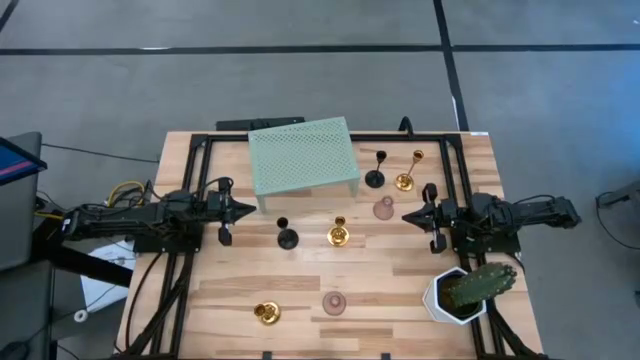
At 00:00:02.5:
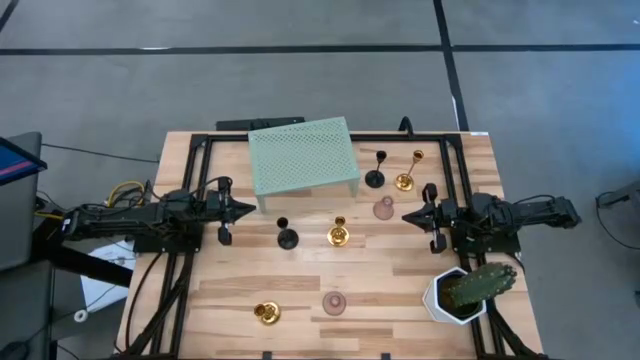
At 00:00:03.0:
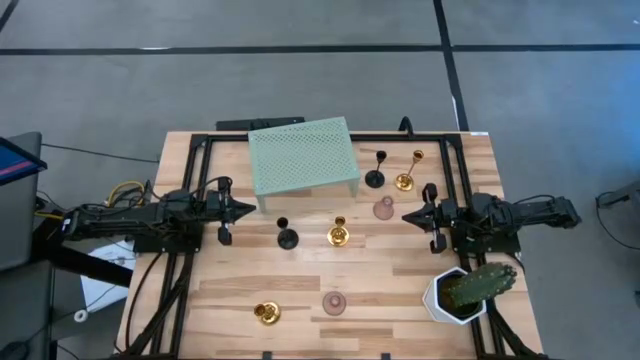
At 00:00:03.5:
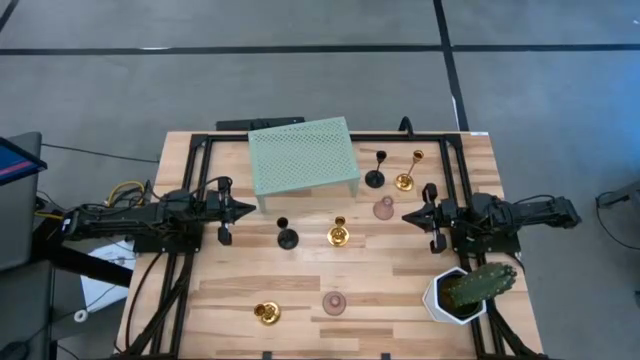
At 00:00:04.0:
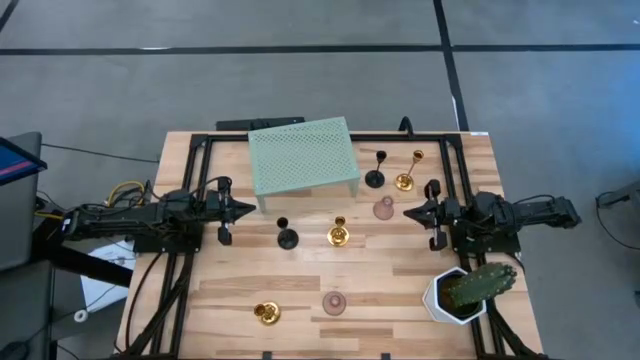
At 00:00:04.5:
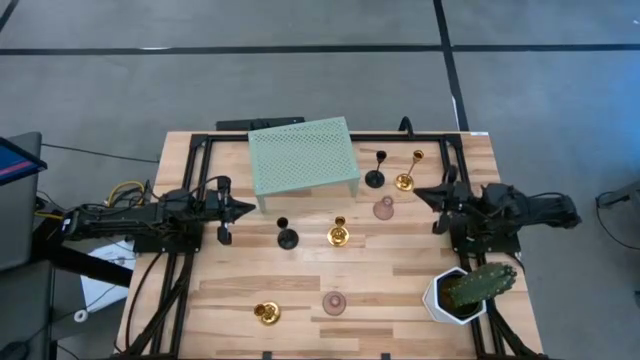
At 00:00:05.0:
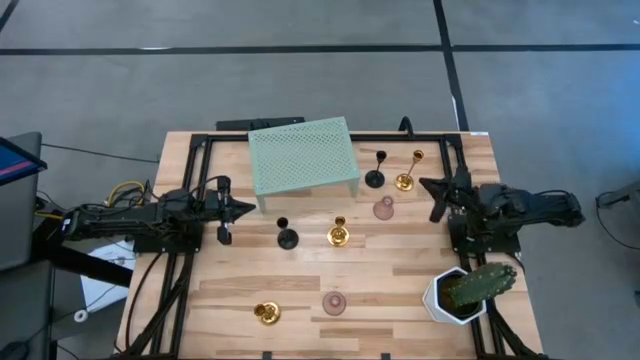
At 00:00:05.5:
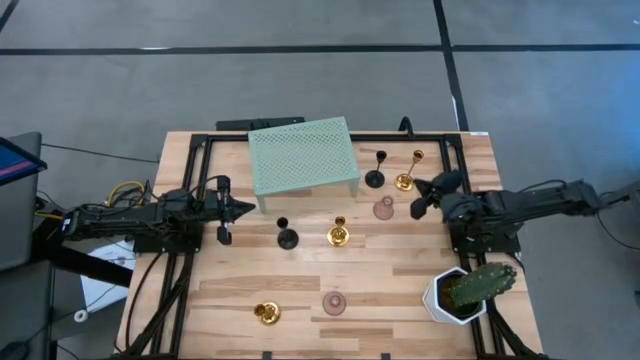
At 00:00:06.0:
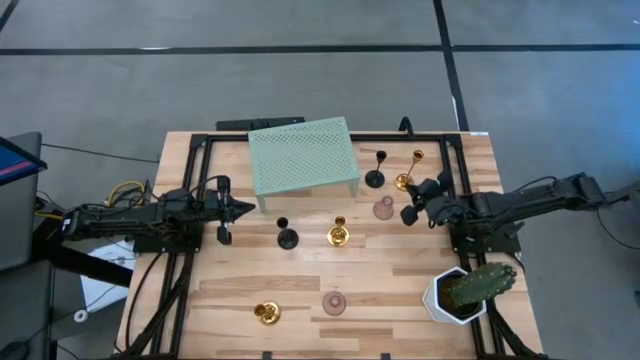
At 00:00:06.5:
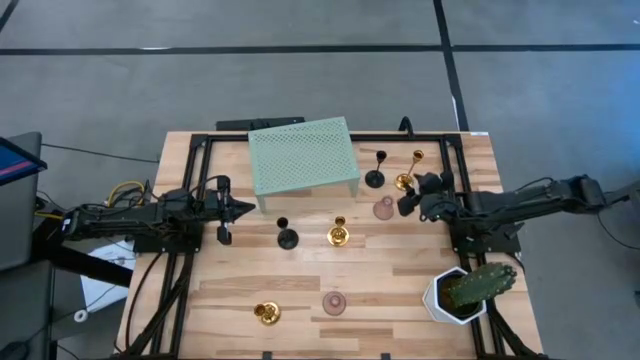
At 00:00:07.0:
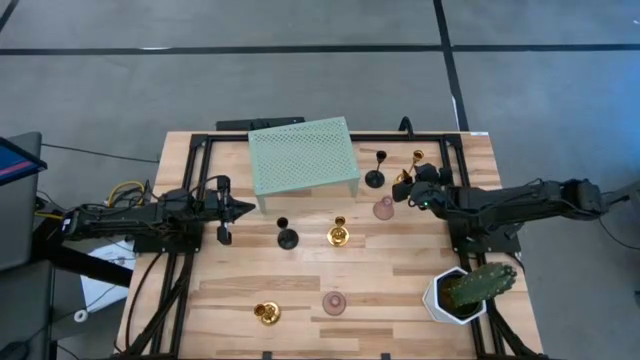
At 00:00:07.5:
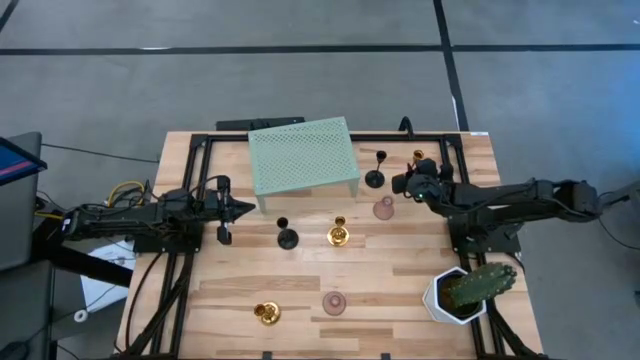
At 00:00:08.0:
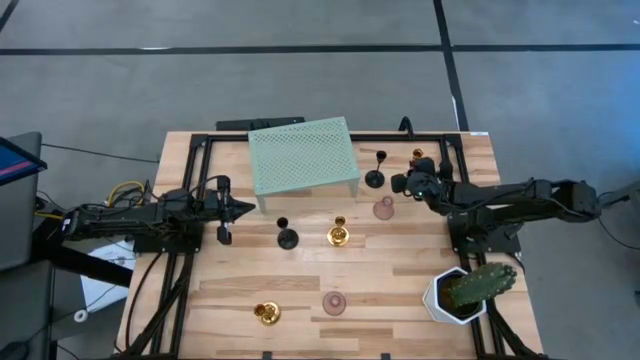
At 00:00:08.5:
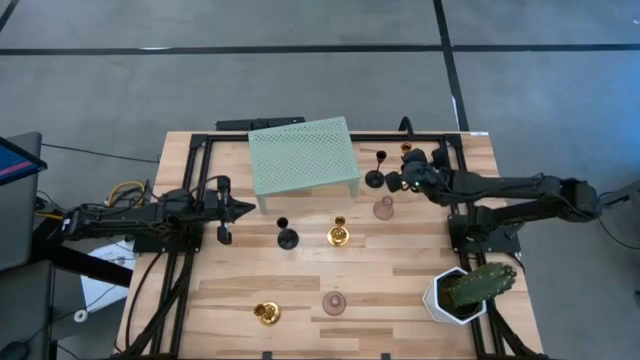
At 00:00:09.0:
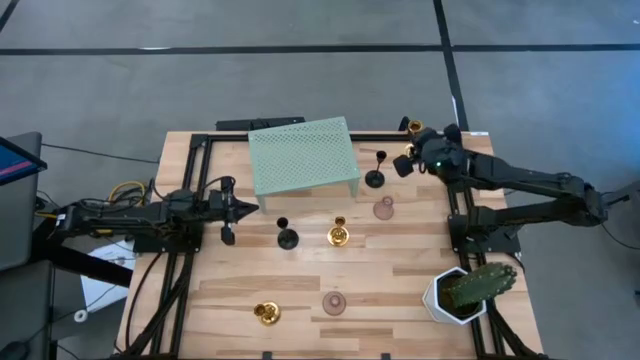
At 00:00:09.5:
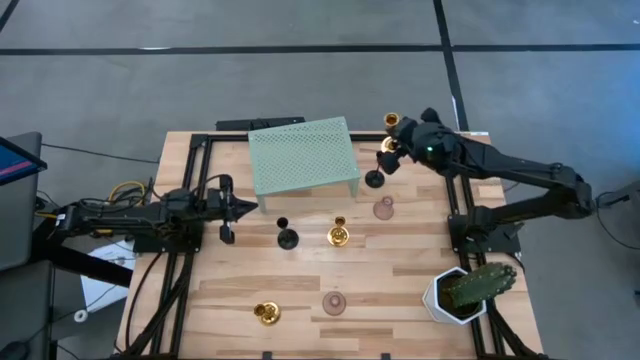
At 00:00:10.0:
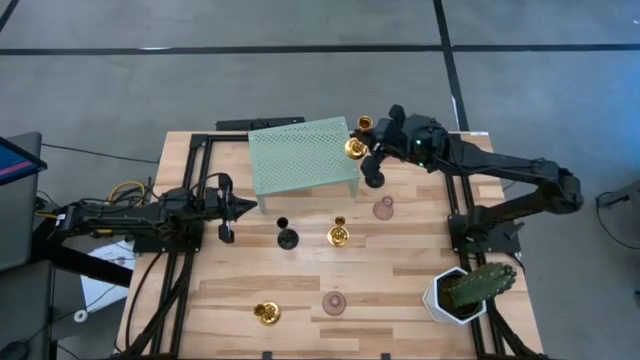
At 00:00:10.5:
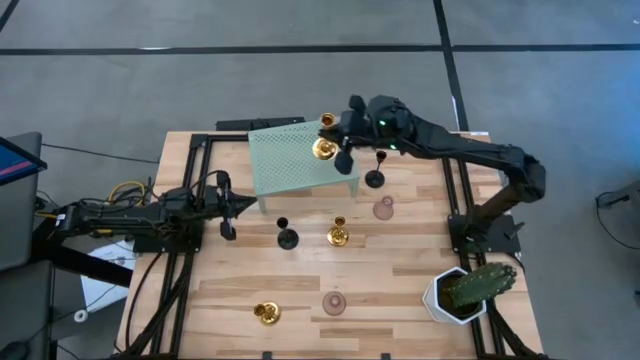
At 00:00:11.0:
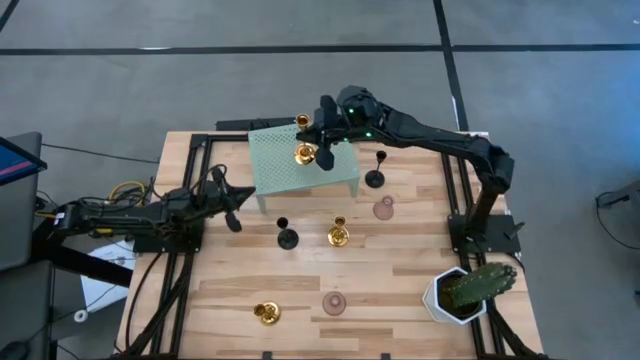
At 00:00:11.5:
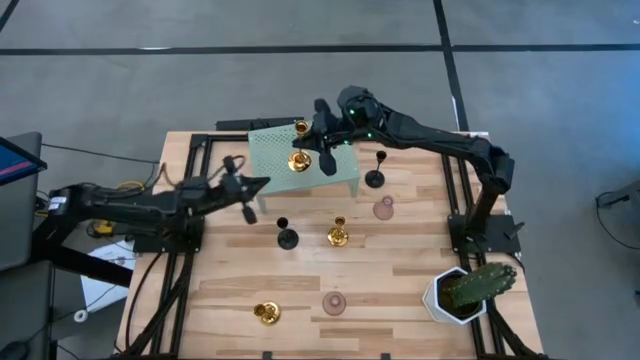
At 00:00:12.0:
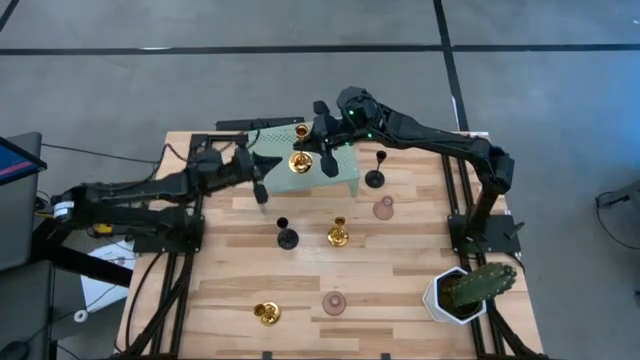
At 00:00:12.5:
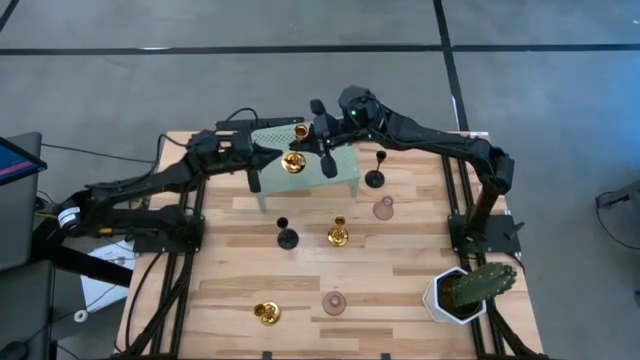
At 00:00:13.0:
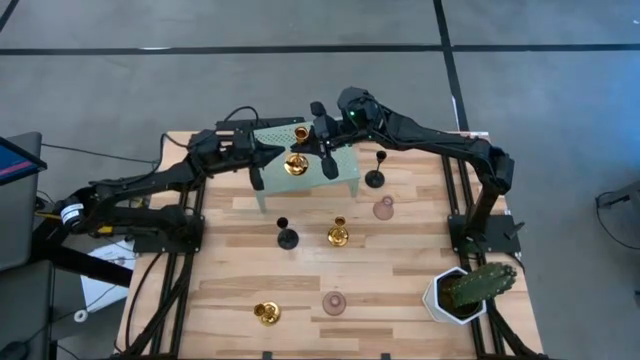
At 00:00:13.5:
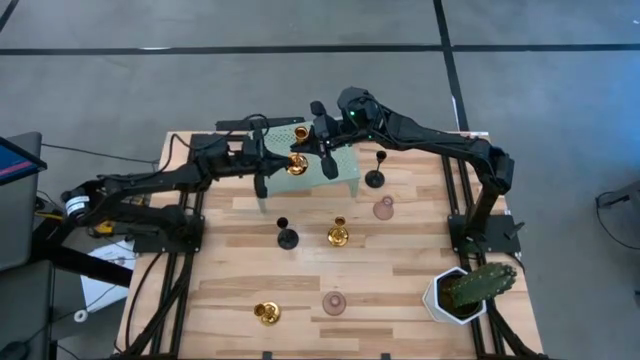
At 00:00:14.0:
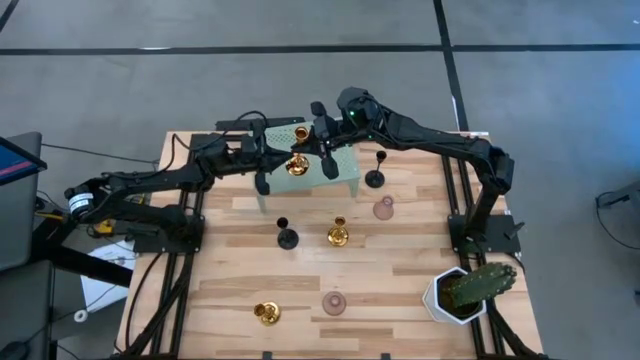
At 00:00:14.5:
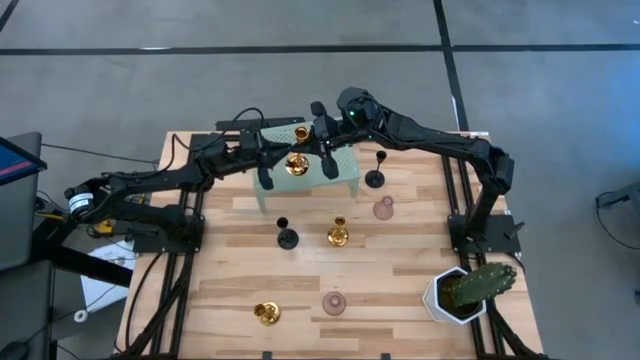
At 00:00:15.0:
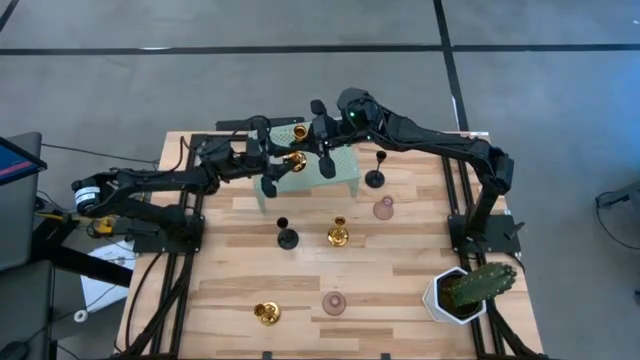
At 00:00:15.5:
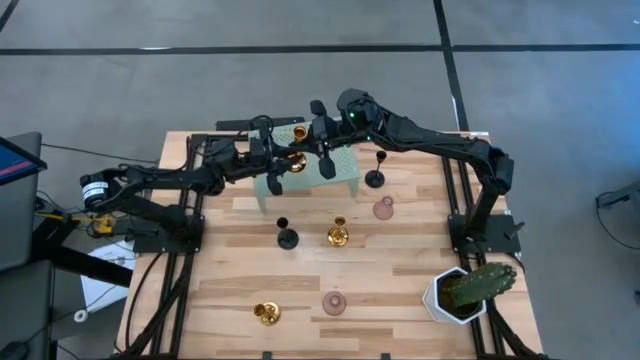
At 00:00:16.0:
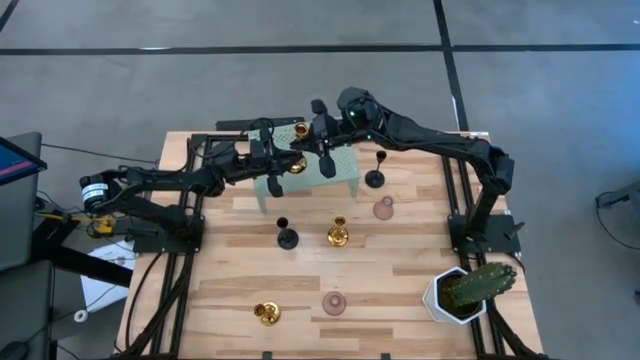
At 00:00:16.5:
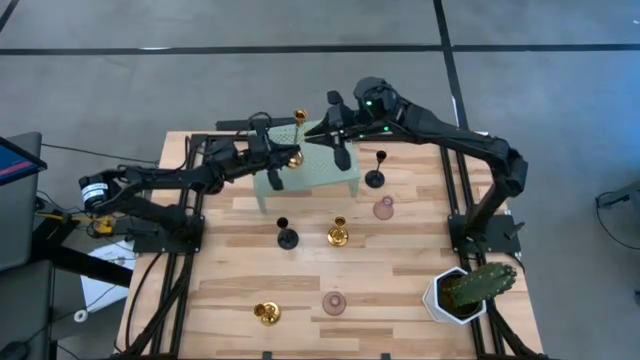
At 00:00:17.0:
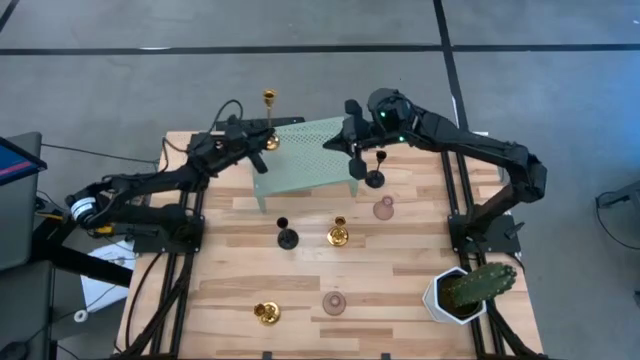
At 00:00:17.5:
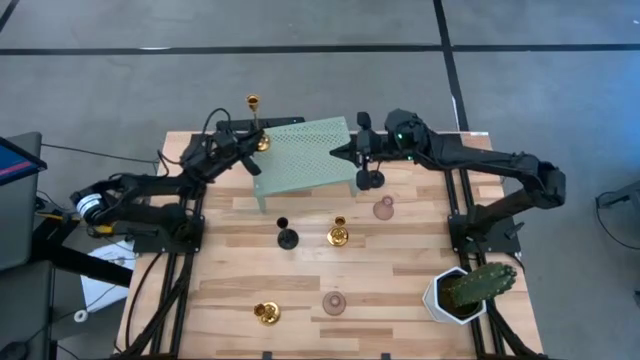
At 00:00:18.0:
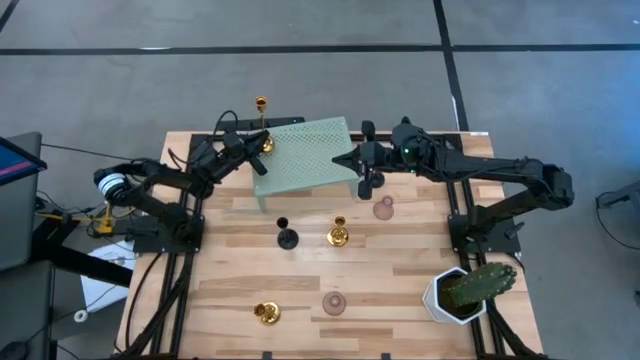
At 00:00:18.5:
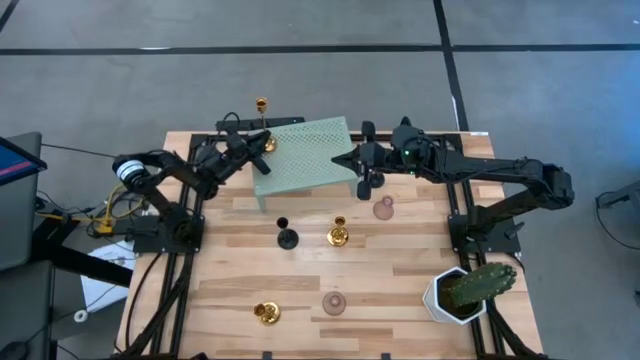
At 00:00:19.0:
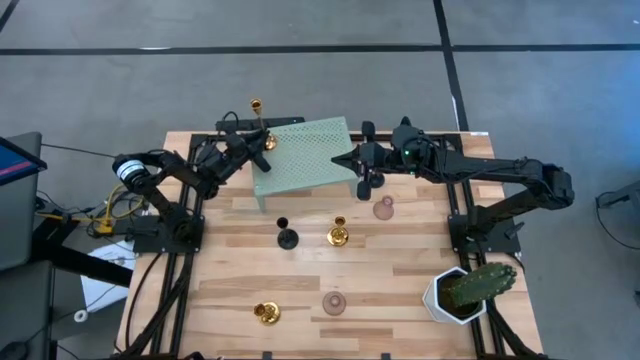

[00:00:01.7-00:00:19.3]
Task: Pick & Place candle stick holders
Put the top gold candle holder on the shelf
